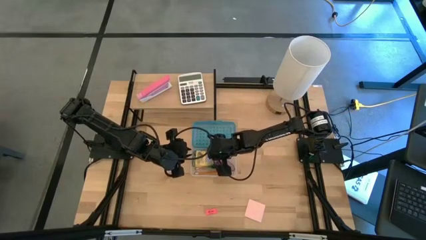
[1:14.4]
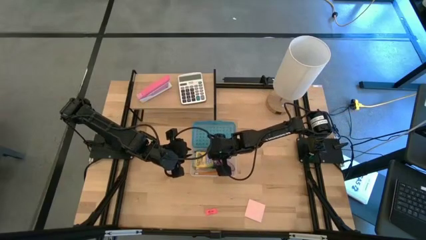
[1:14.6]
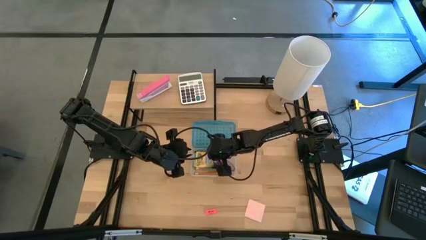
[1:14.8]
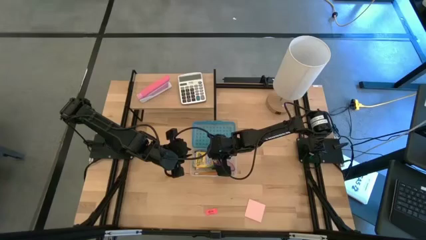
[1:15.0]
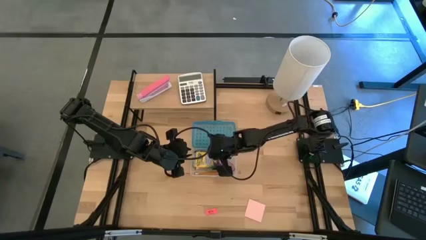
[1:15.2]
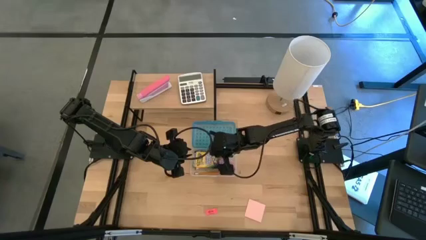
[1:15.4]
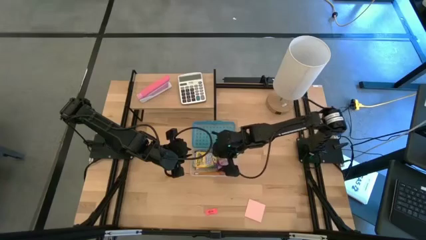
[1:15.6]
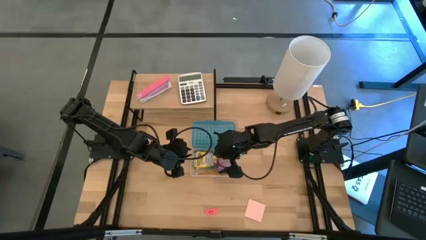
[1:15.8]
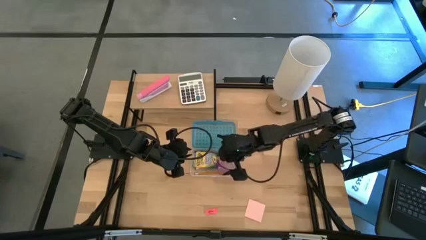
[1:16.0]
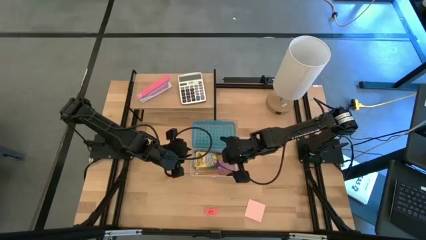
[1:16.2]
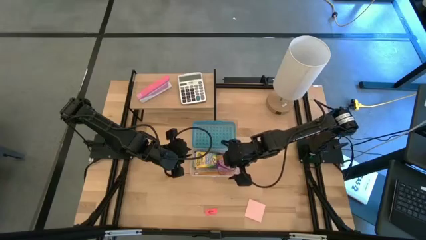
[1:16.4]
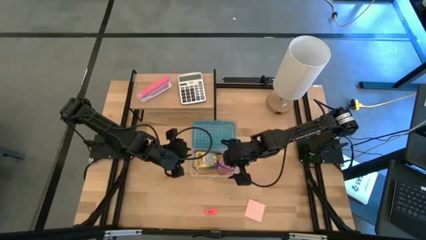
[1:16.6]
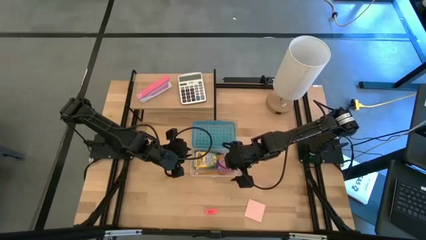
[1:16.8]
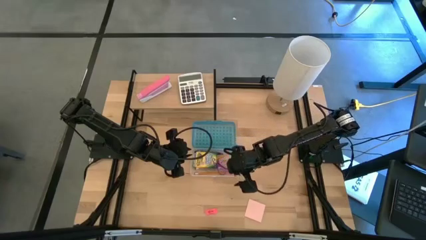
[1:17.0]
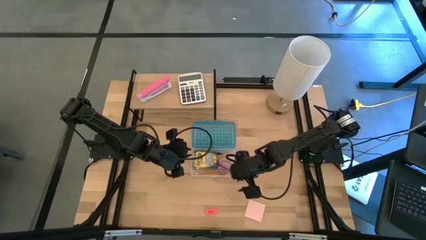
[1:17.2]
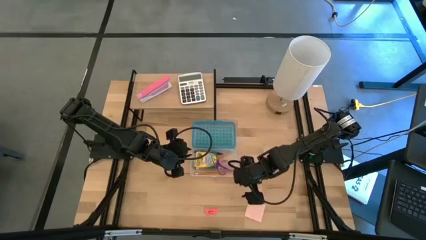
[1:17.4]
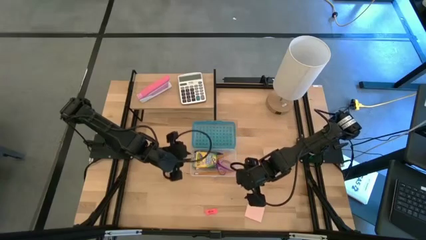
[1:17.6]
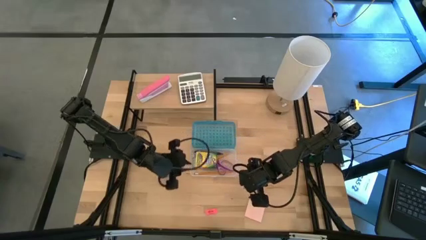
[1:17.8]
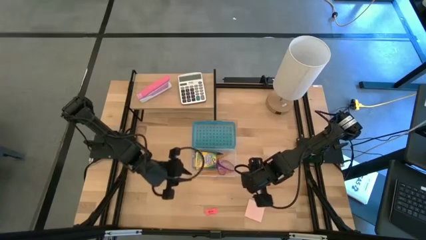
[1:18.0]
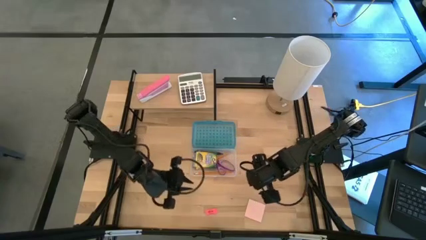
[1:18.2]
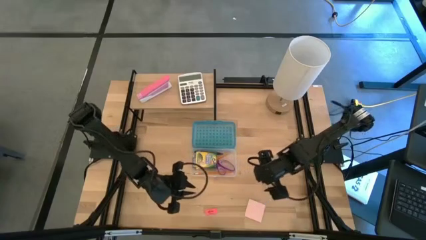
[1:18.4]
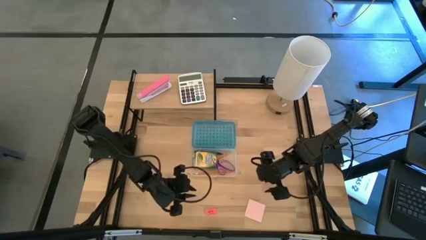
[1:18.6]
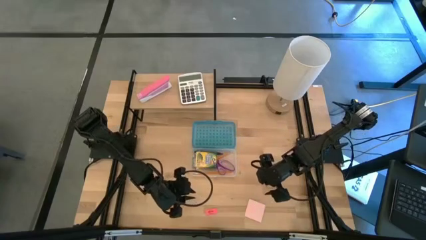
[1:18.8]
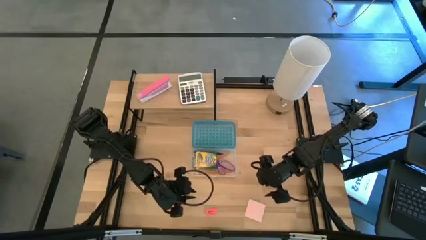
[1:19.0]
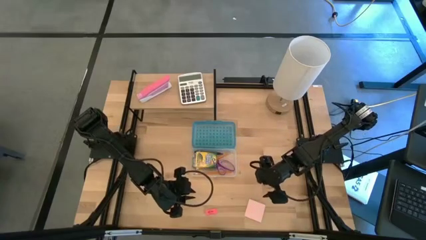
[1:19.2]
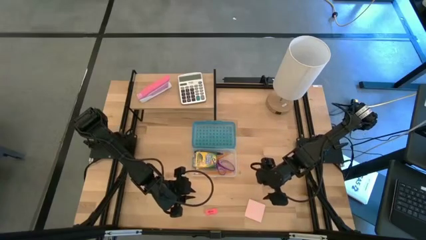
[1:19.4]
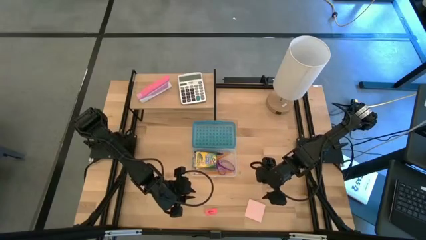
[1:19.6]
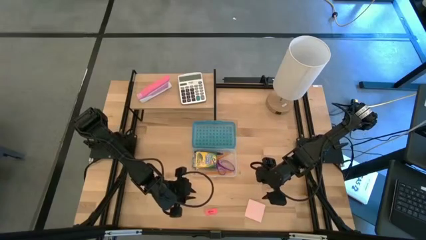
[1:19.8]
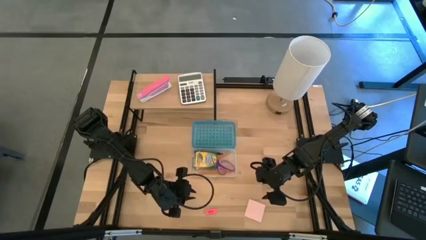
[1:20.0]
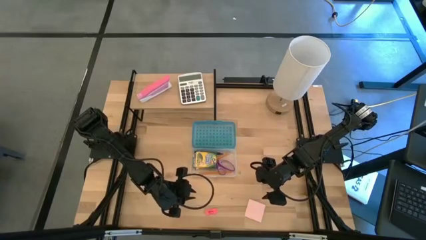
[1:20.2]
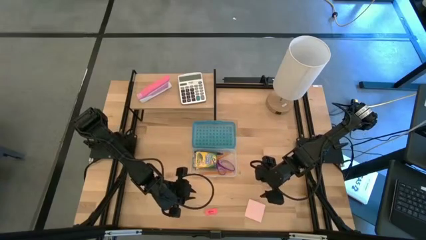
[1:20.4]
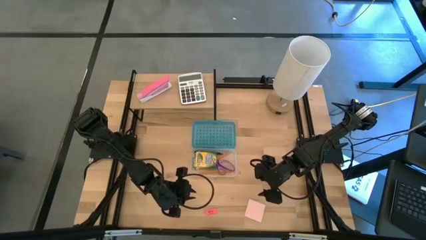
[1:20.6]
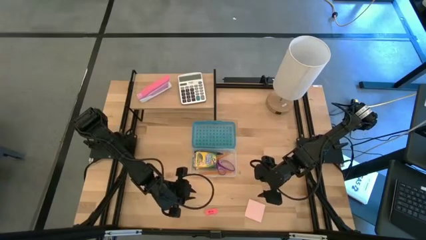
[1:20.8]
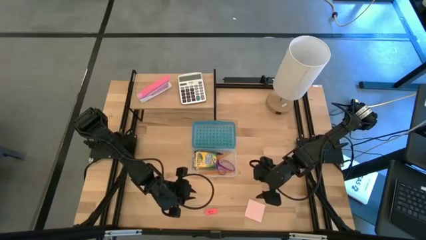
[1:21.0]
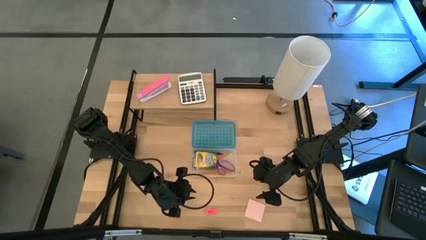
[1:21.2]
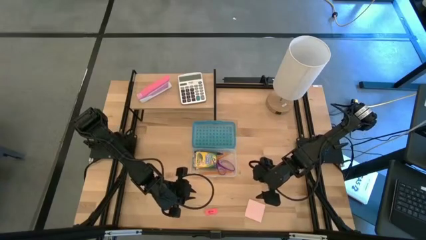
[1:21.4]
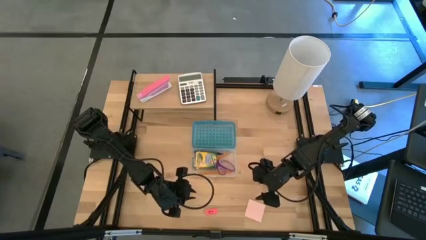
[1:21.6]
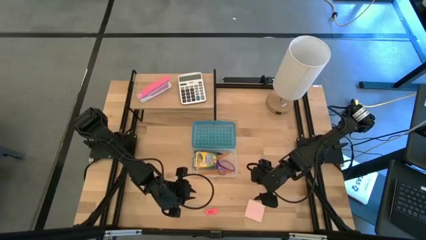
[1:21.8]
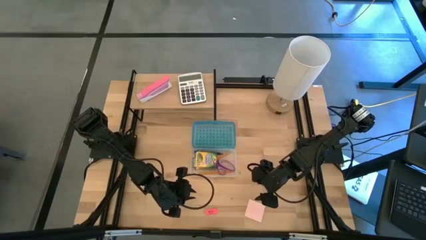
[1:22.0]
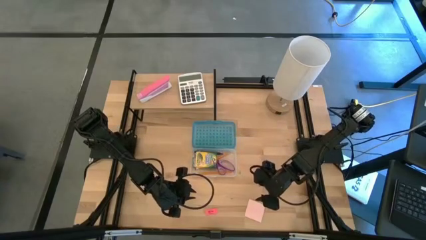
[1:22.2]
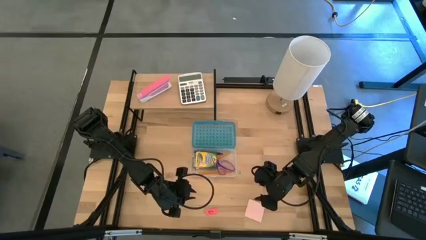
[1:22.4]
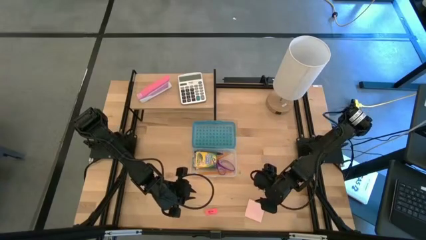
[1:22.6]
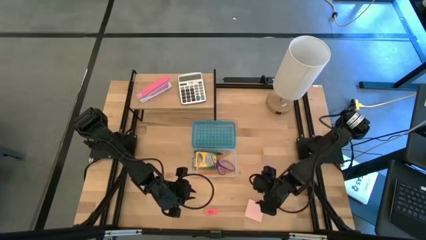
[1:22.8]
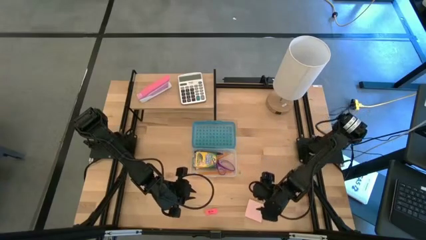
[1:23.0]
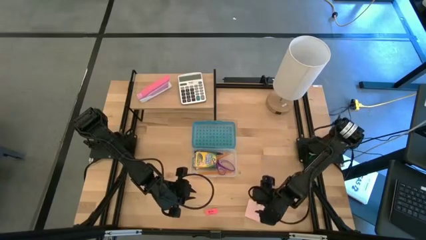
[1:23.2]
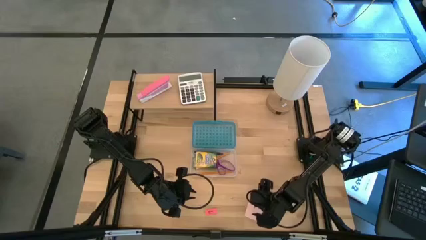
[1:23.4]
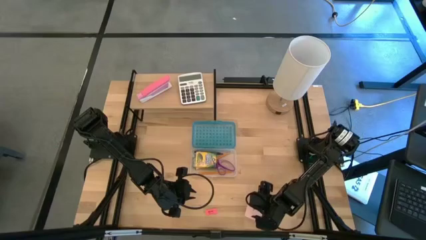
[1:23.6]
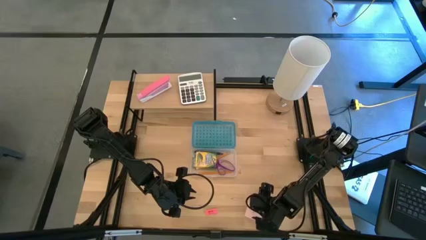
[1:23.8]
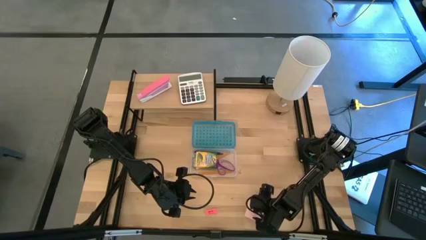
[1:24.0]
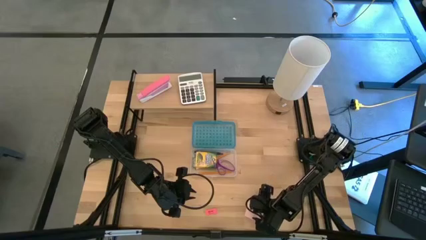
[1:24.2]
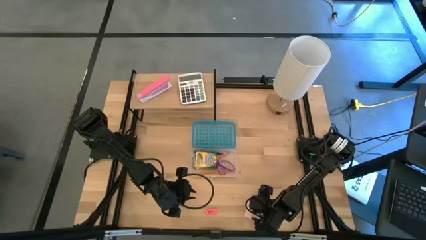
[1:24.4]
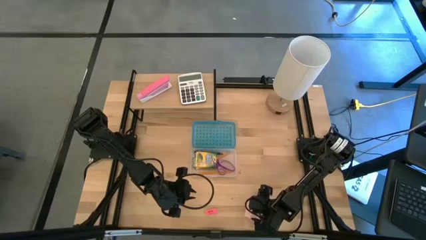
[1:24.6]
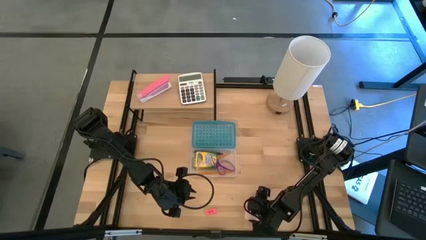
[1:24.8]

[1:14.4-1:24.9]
Task: Pack school essentials
Put the pink sticky notes into the blue supply box

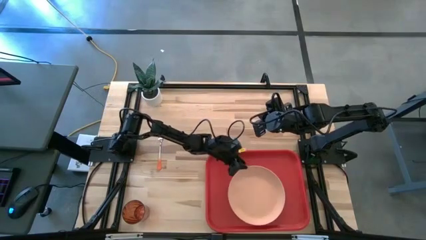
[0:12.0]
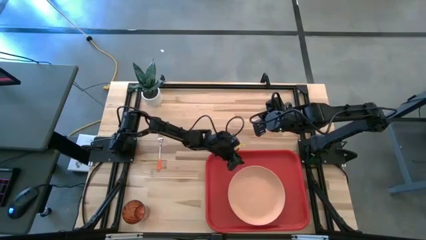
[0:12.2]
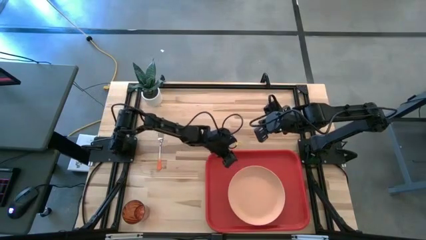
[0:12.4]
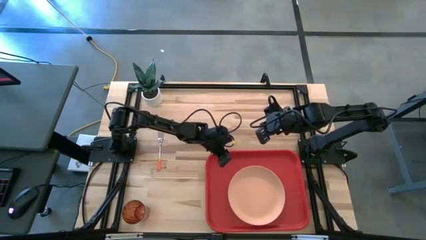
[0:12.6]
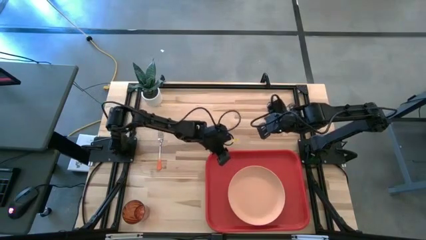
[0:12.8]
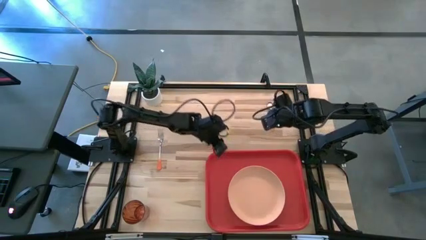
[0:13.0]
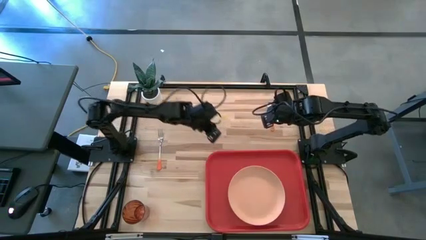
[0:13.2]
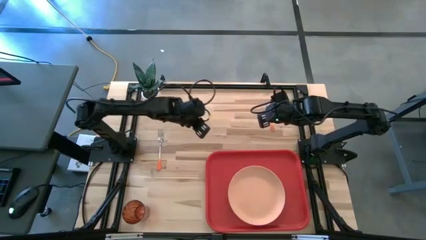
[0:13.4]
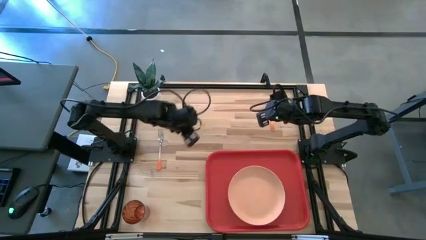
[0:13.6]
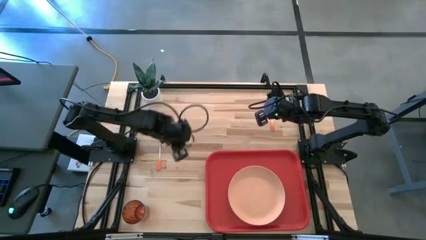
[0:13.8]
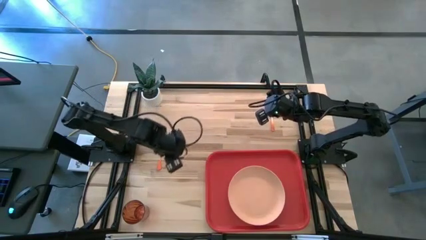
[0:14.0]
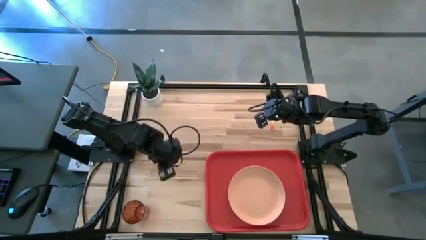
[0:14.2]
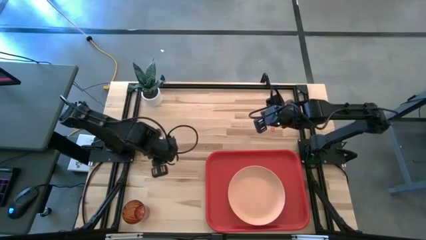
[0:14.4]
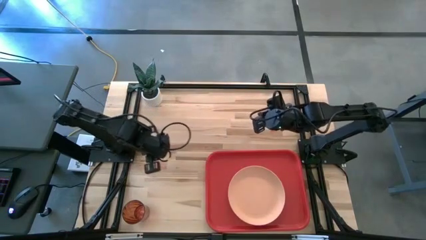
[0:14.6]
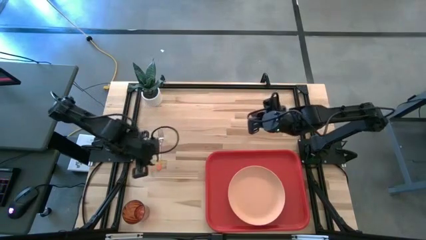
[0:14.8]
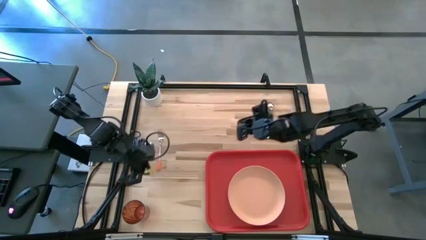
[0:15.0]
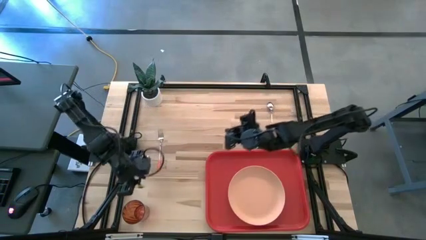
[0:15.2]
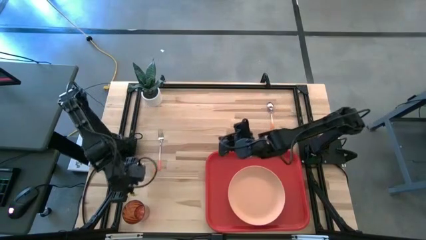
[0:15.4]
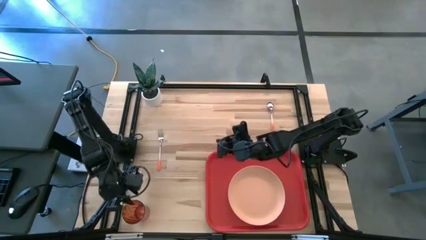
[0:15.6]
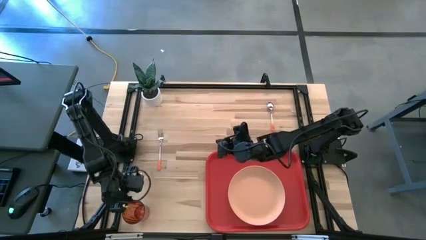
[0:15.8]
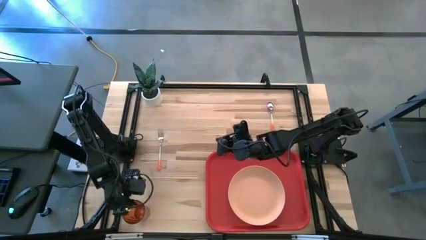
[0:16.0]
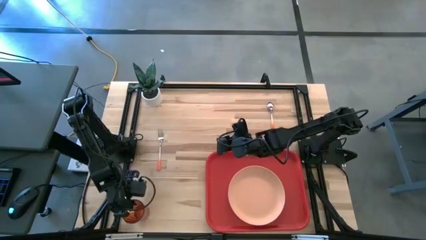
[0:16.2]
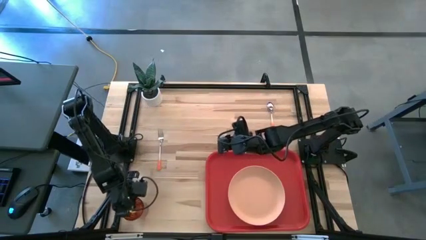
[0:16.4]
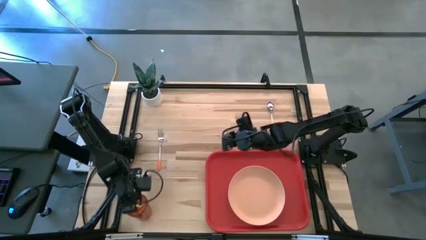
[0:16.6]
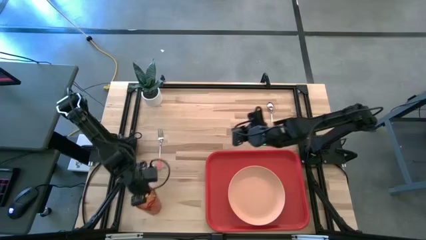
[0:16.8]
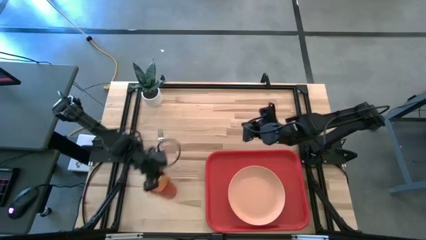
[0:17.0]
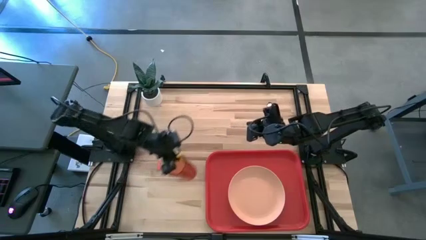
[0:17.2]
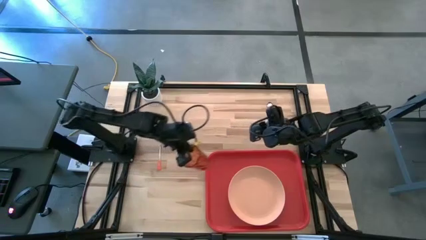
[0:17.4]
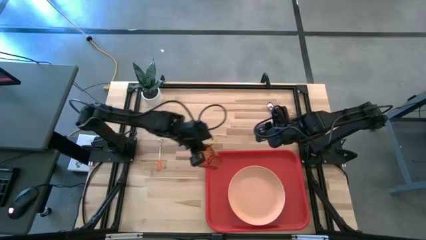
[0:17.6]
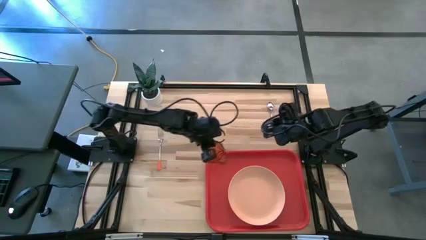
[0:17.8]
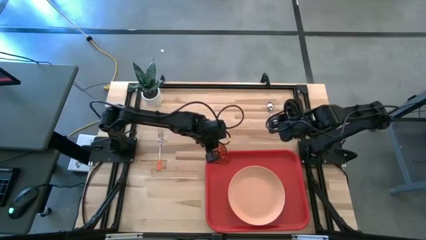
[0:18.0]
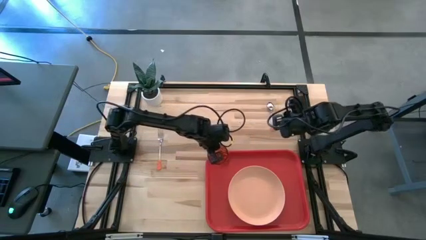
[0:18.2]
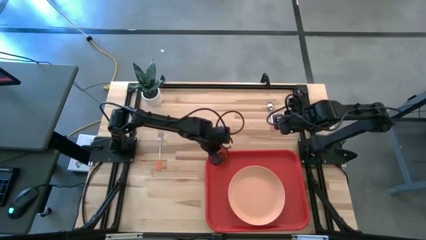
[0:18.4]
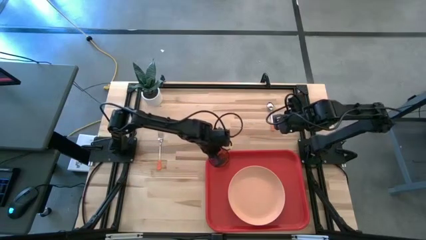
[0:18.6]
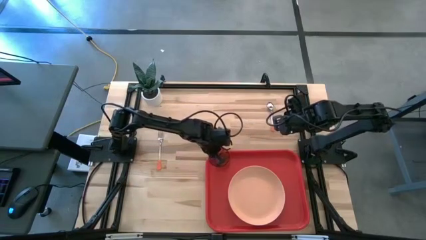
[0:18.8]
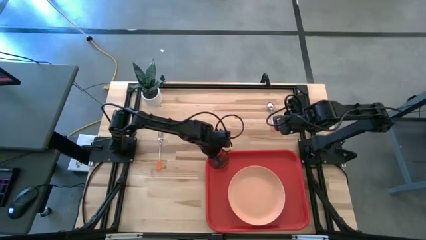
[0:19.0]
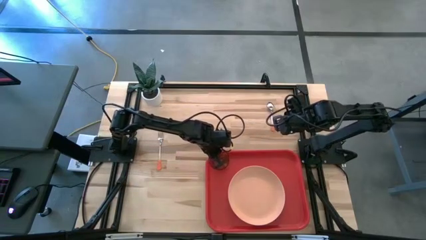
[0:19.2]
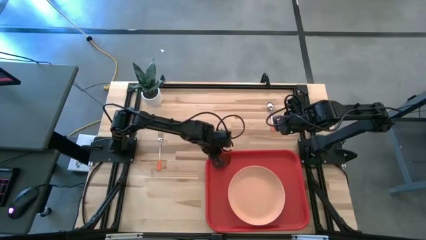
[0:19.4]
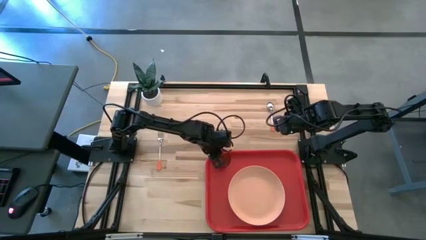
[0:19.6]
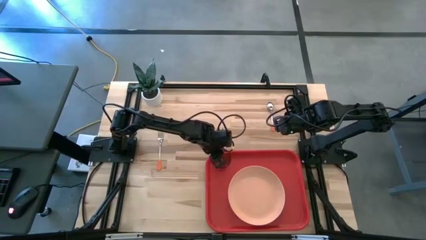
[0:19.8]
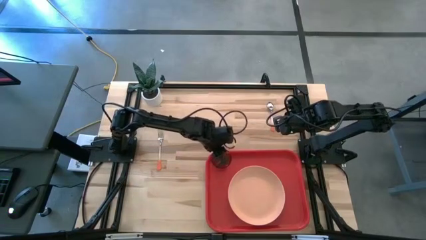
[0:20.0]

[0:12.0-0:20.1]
Task: Pick and place plate/cup/fork/spoon on tray
Put the red cup on the top left corner of the red tray
